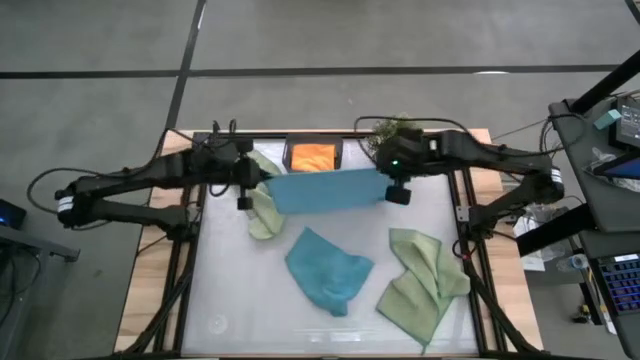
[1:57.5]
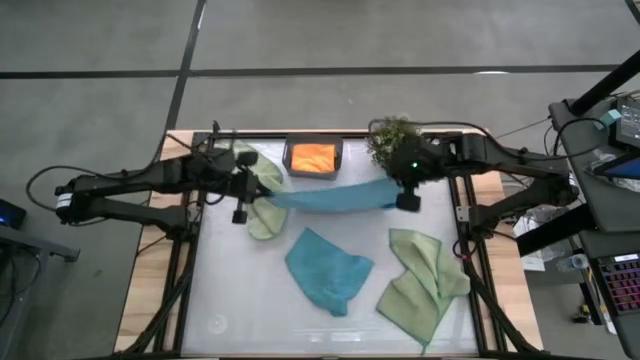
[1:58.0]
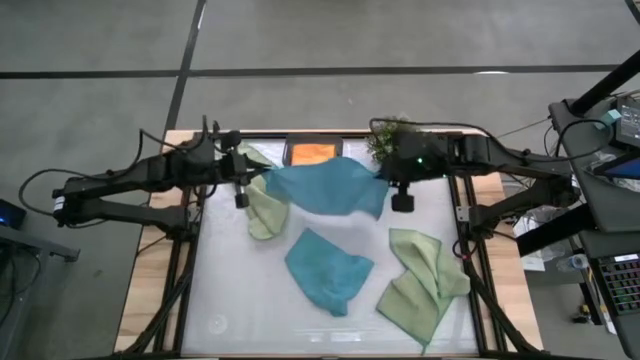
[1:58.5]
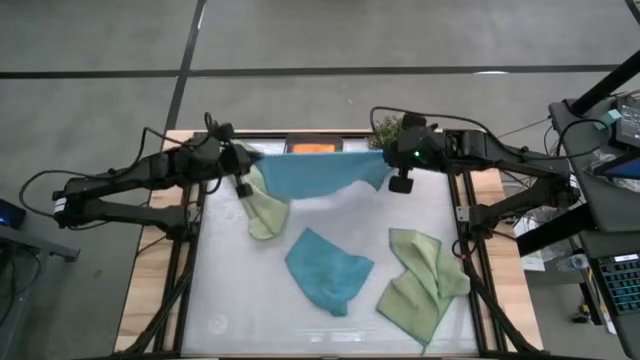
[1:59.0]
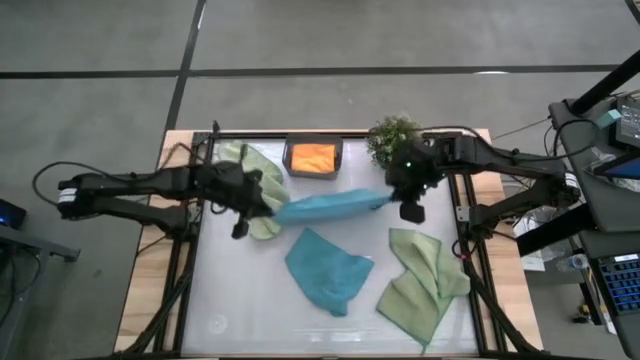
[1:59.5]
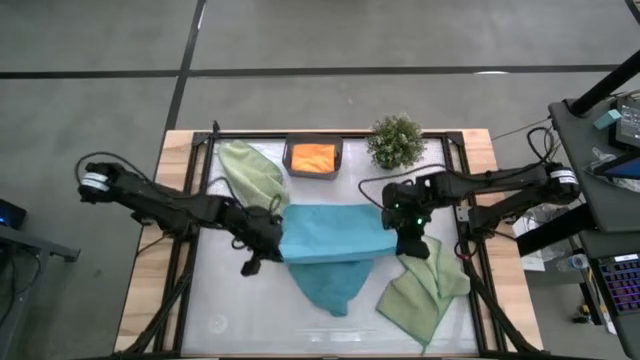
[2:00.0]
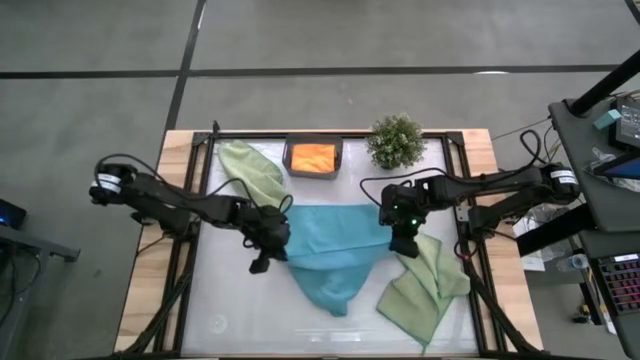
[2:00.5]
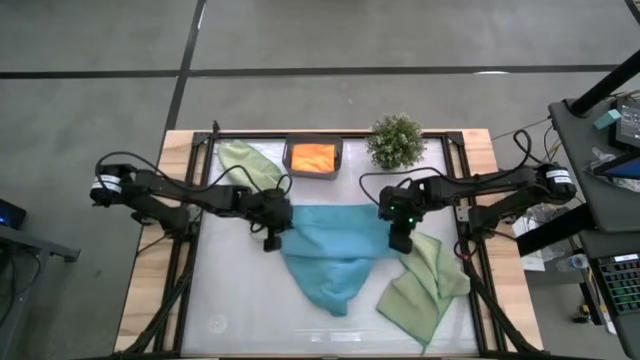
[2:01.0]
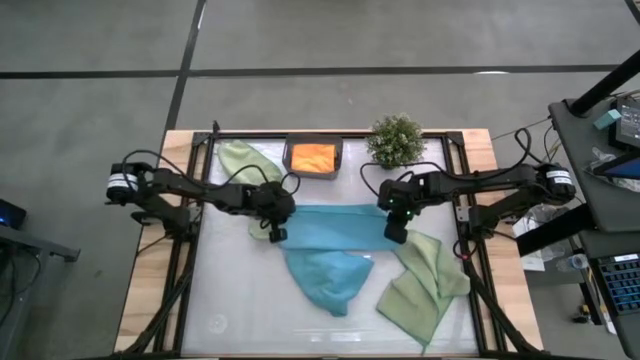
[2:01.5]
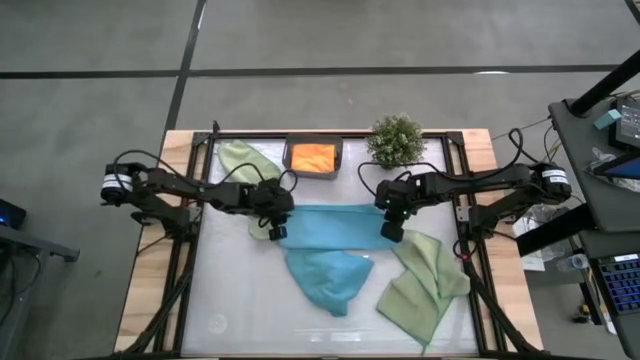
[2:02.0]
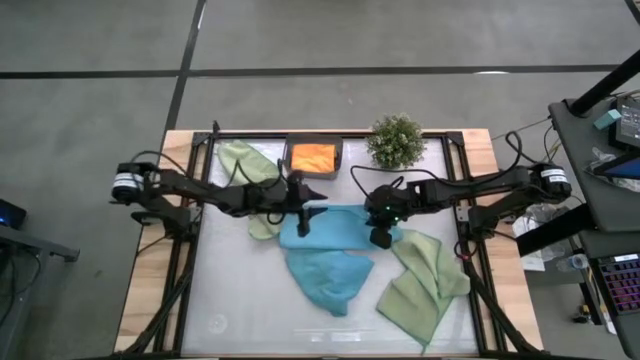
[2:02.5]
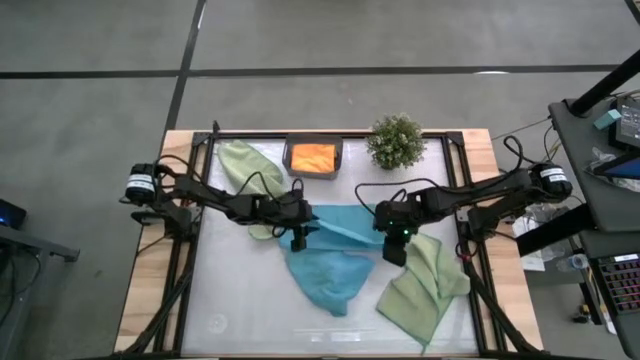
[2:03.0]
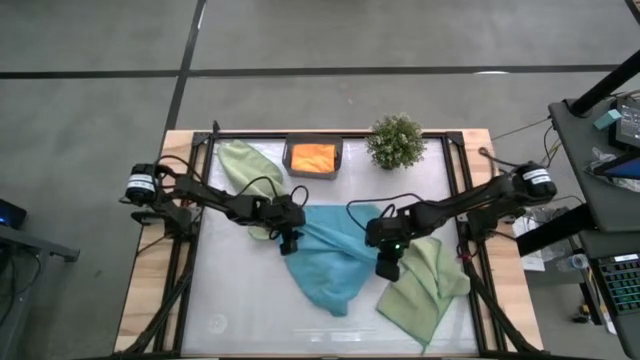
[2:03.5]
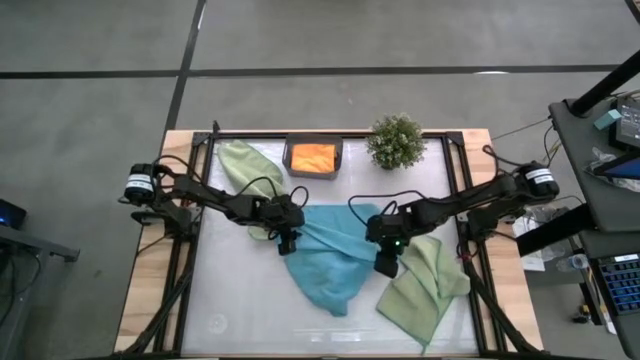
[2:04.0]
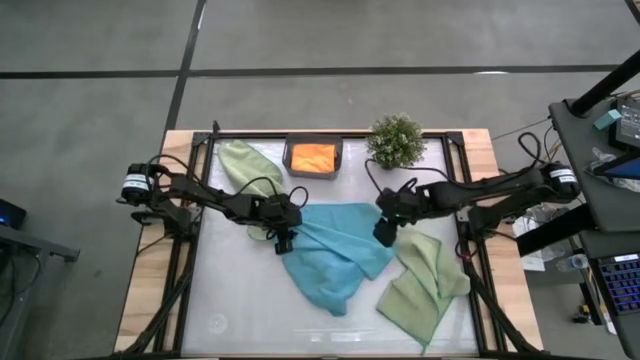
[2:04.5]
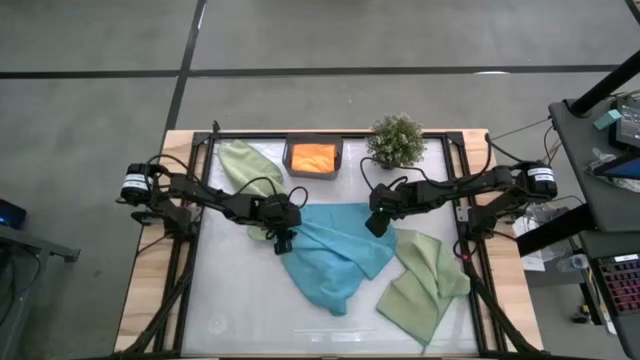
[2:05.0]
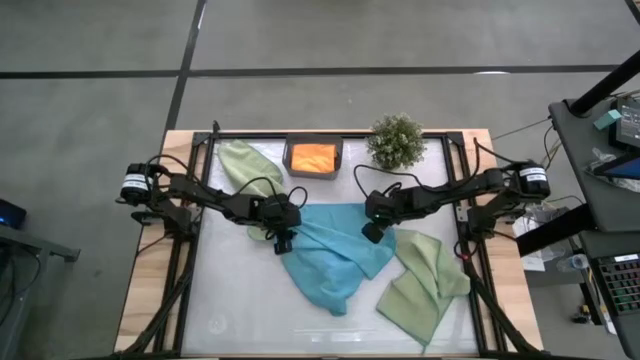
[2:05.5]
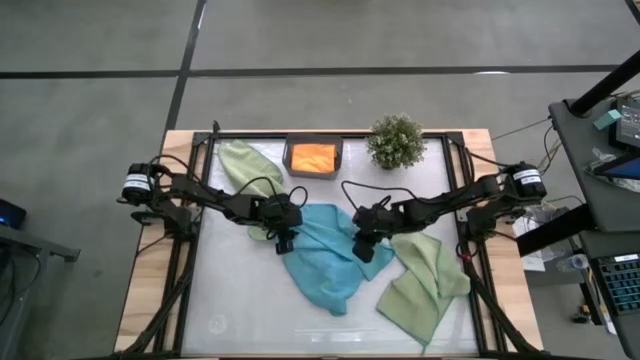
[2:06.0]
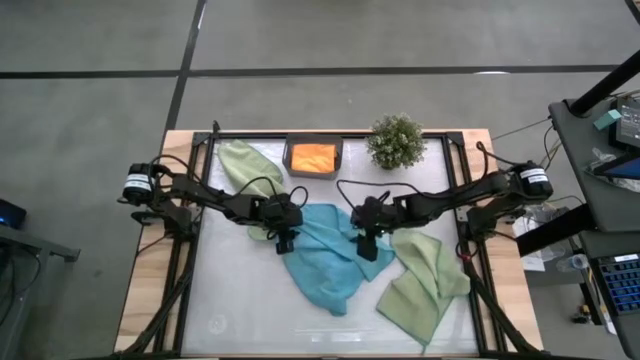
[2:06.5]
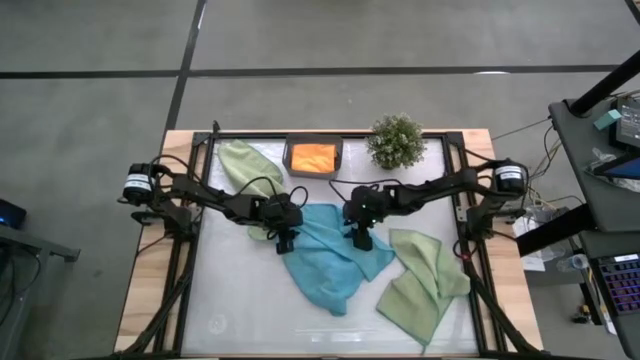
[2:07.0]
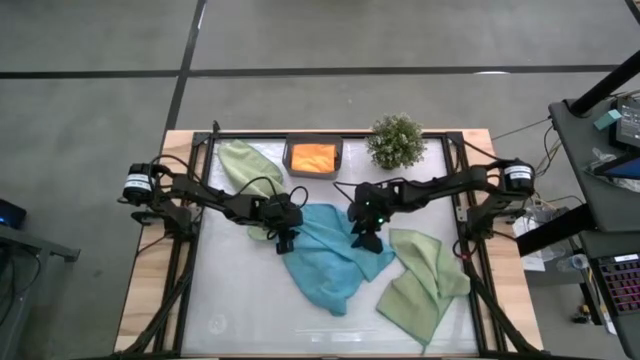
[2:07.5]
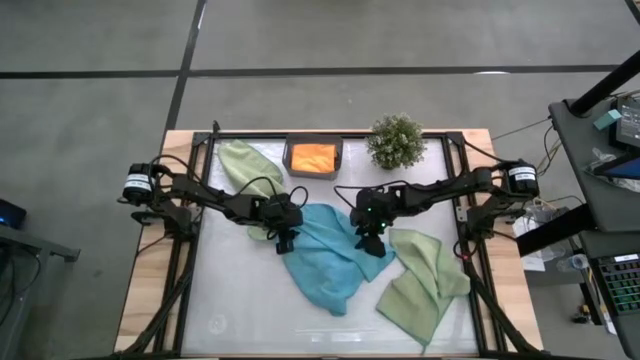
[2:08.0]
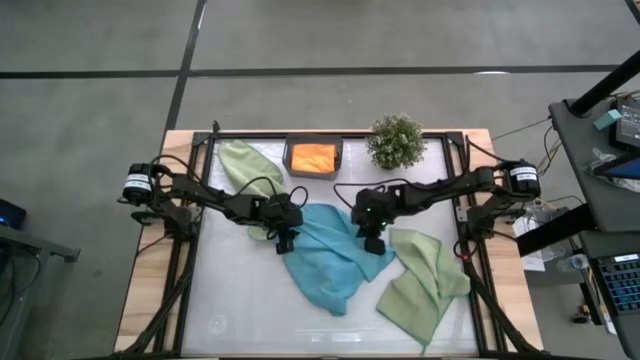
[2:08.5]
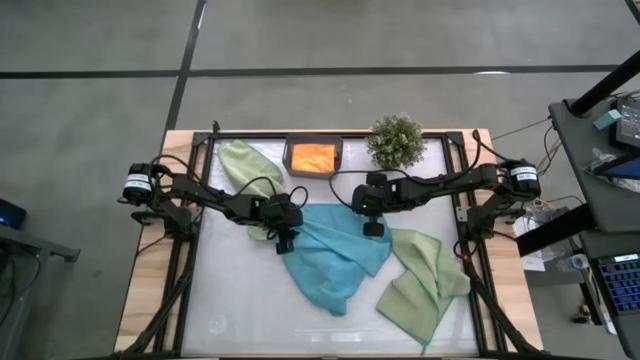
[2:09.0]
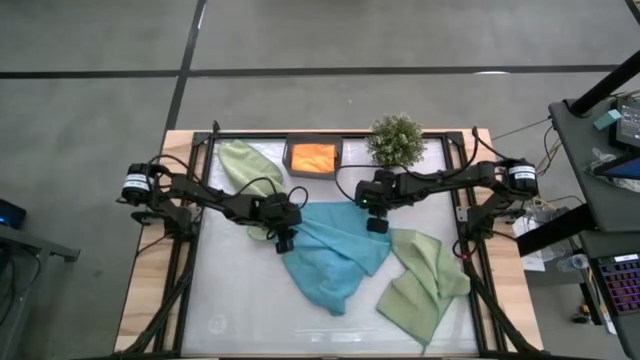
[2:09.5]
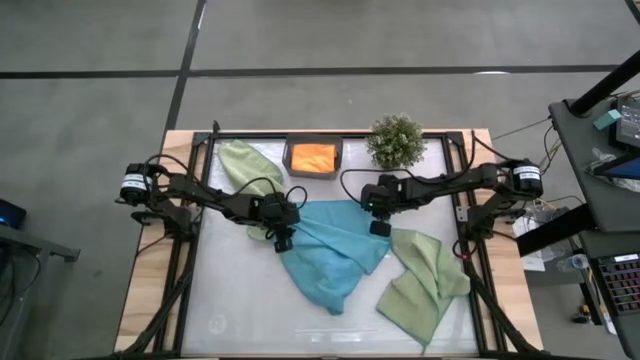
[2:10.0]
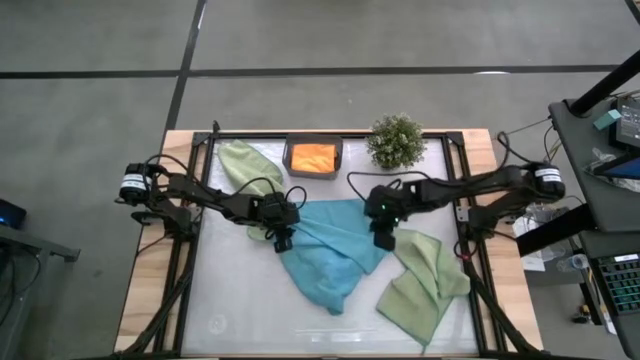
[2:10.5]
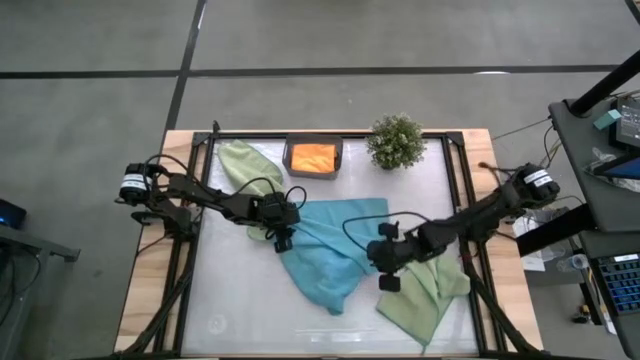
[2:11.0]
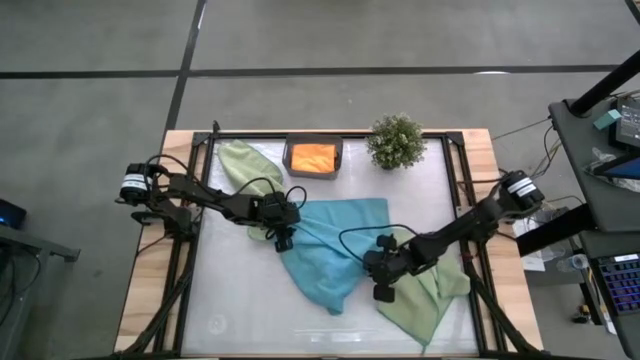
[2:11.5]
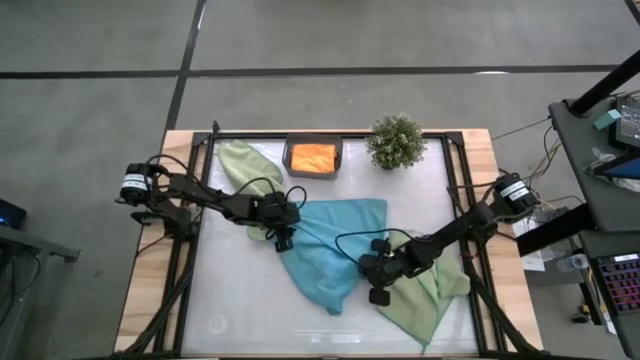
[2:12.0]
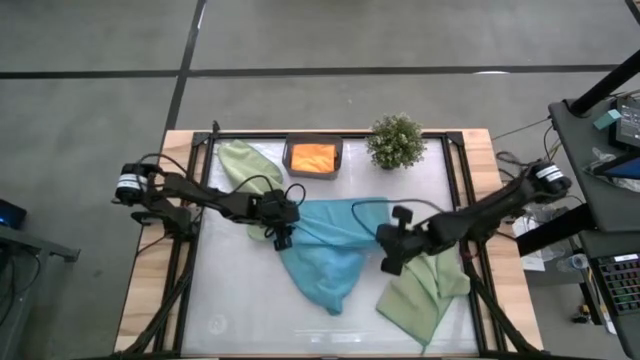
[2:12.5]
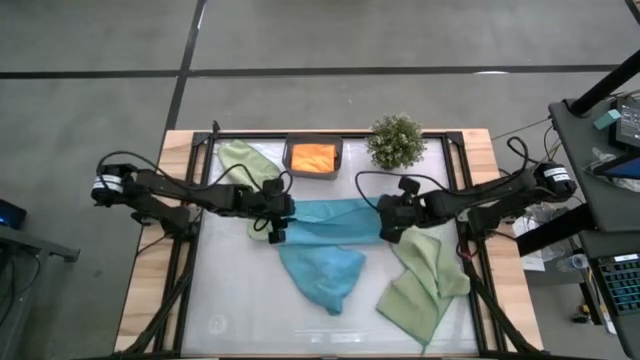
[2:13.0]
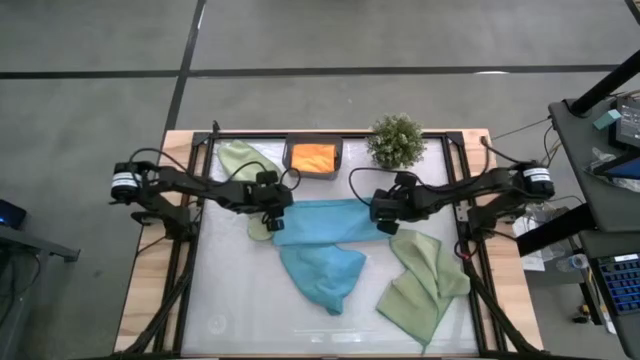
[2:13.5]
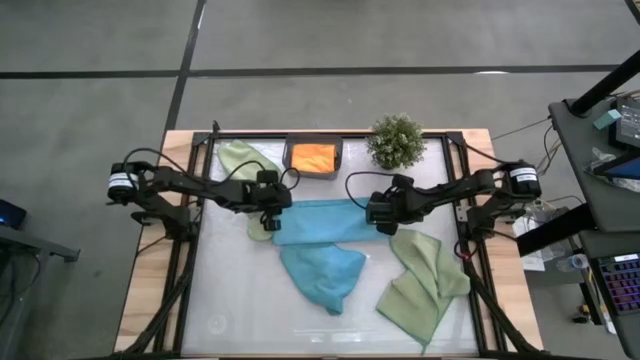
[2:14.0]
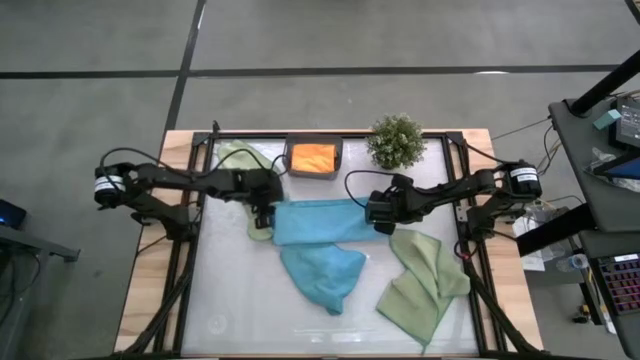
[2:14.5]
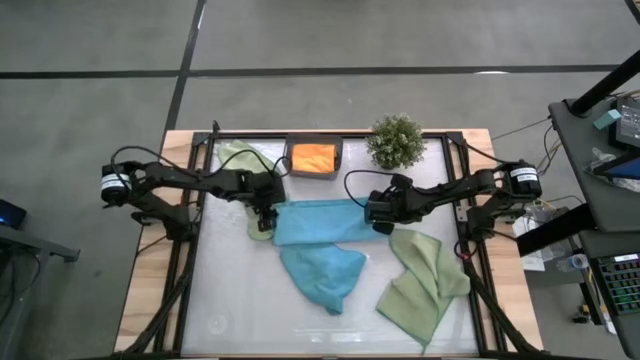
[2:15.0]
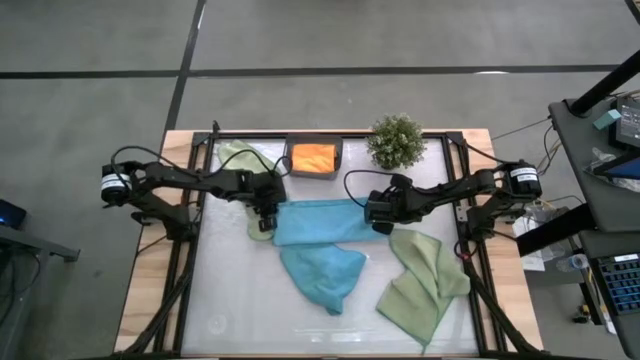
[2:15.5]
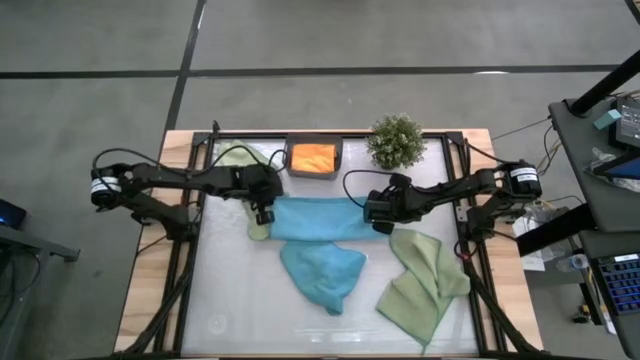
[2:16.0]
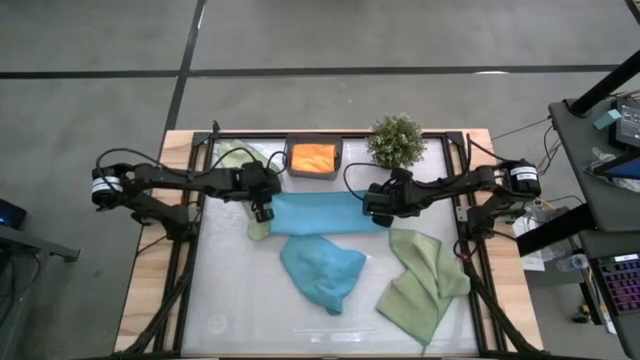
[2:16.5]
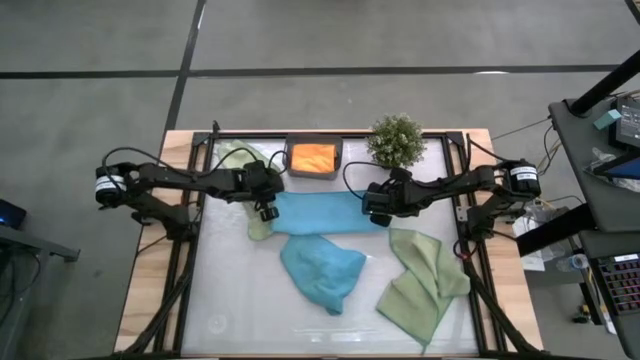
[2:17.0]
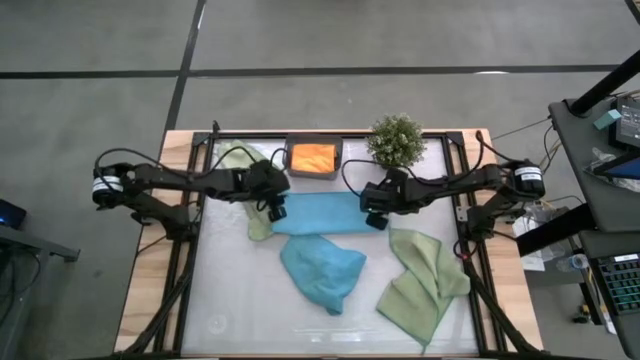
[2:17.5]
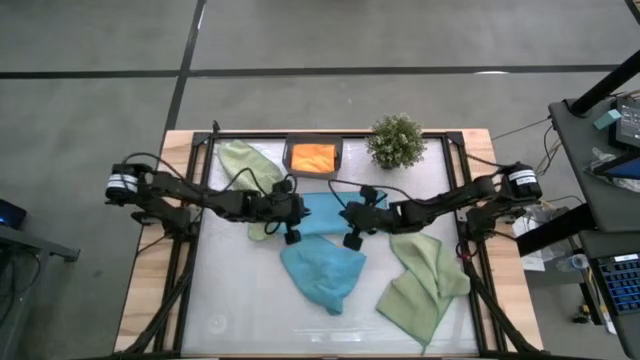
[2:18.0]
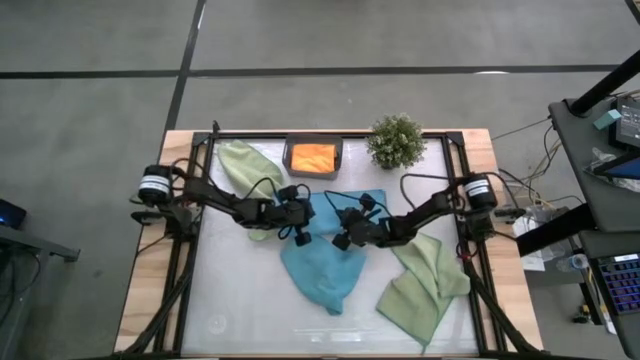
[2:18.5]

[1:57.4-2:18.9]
Task: Fold microfiber towels
Fold the left blue microfiber towel
